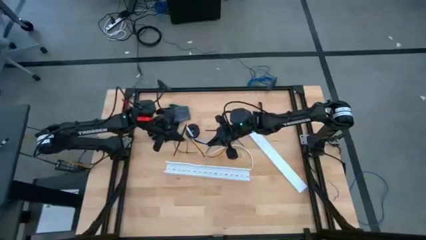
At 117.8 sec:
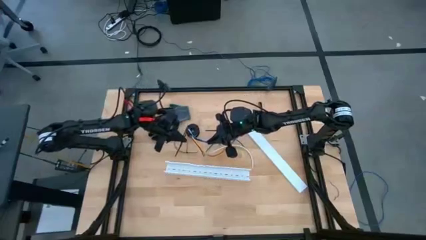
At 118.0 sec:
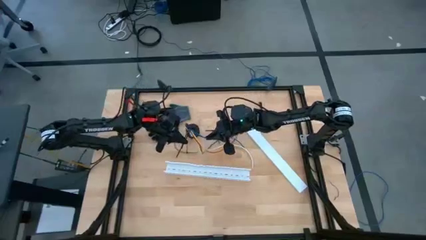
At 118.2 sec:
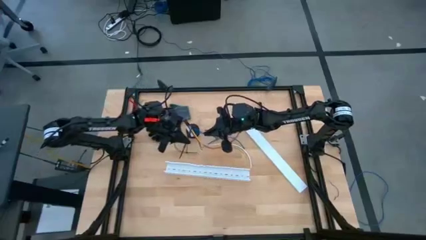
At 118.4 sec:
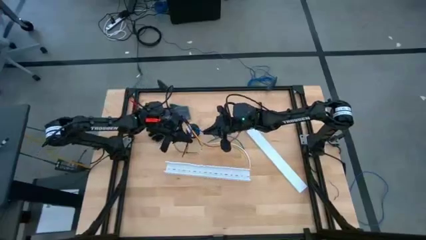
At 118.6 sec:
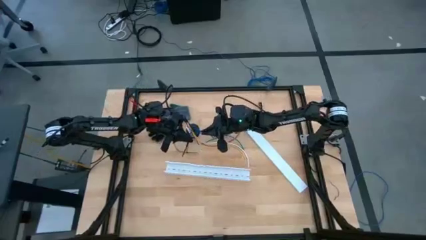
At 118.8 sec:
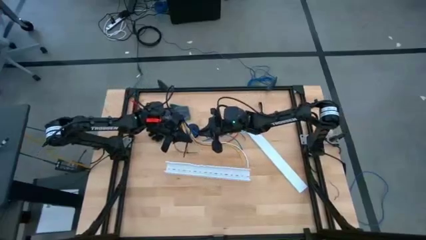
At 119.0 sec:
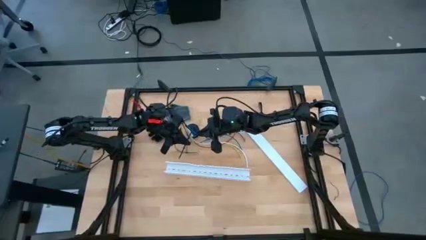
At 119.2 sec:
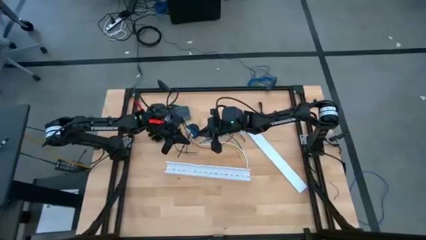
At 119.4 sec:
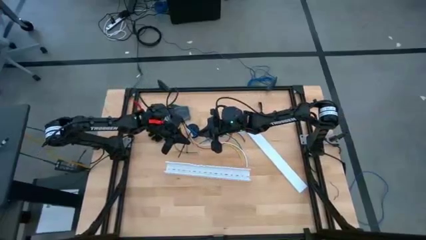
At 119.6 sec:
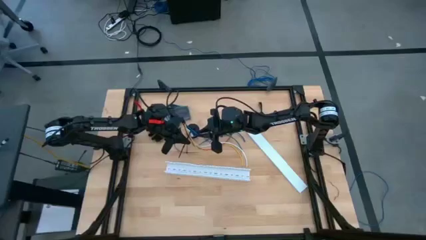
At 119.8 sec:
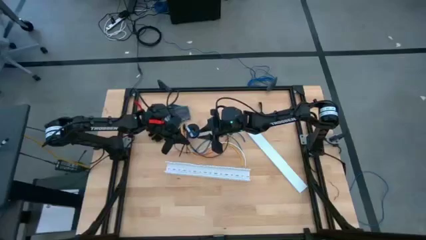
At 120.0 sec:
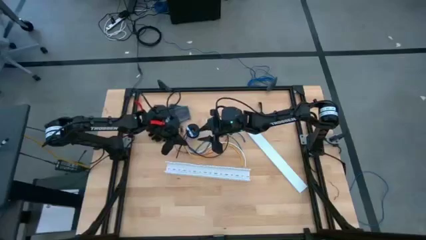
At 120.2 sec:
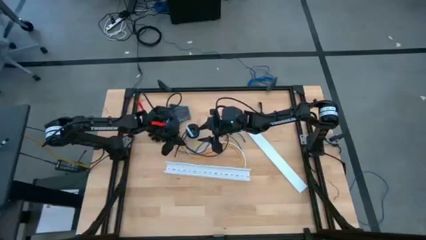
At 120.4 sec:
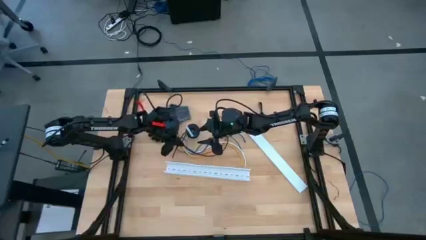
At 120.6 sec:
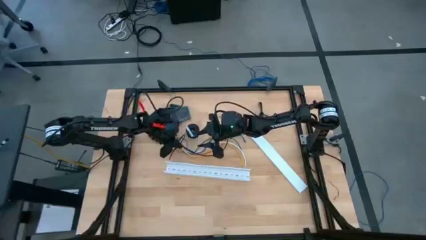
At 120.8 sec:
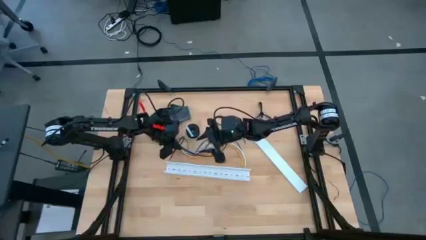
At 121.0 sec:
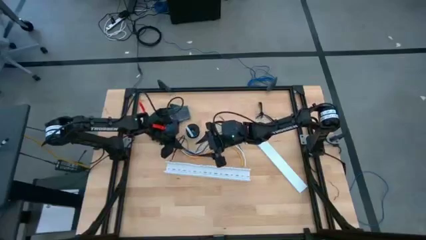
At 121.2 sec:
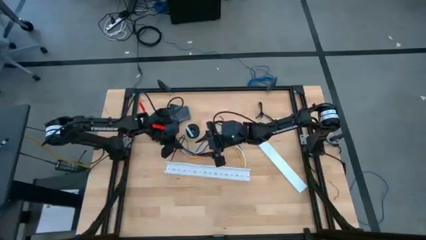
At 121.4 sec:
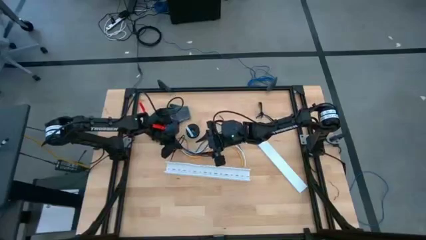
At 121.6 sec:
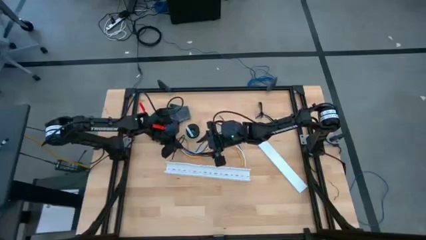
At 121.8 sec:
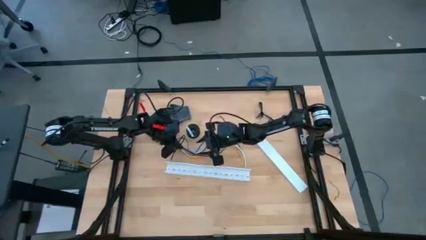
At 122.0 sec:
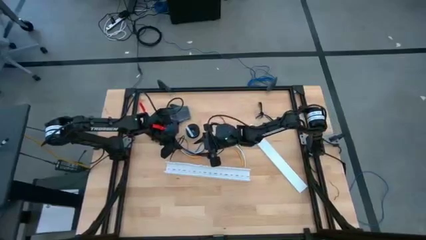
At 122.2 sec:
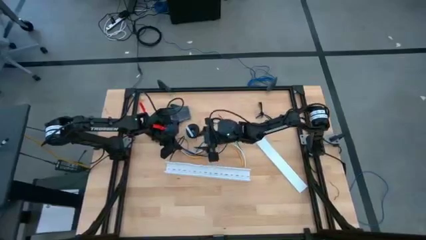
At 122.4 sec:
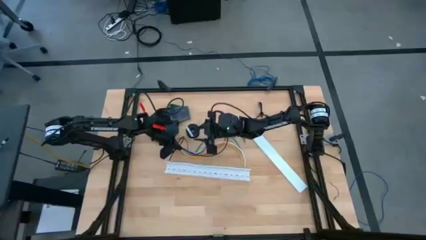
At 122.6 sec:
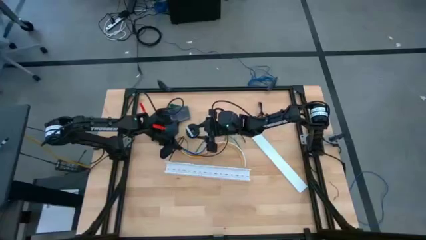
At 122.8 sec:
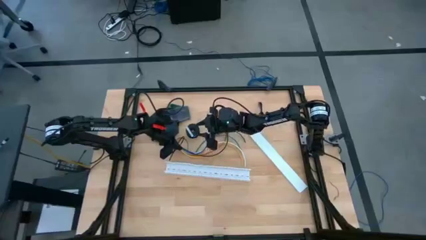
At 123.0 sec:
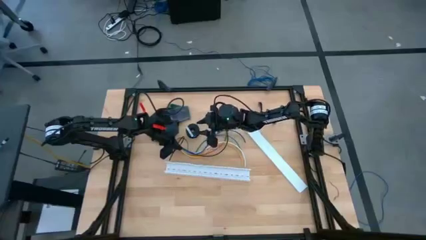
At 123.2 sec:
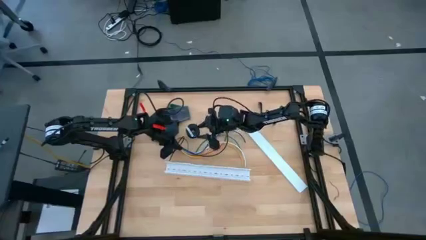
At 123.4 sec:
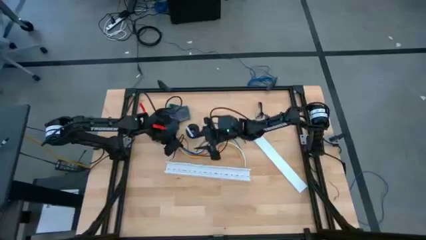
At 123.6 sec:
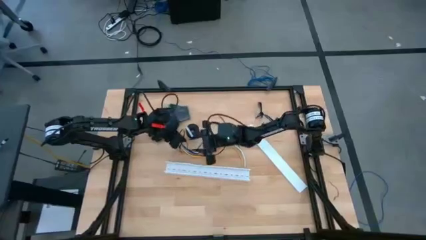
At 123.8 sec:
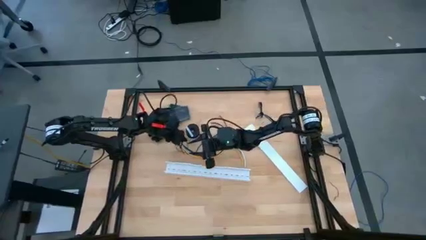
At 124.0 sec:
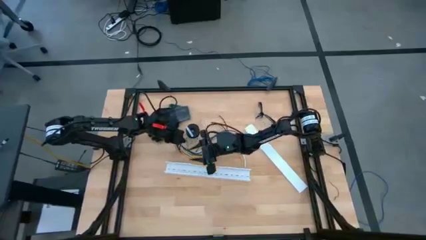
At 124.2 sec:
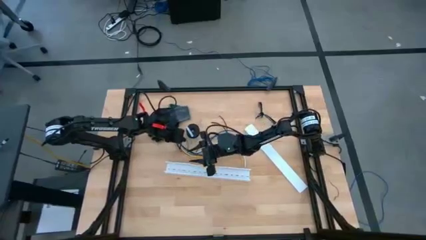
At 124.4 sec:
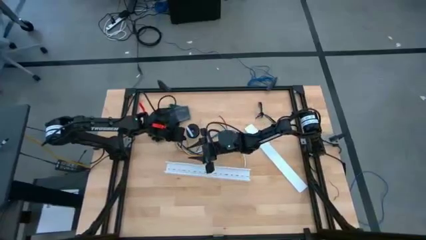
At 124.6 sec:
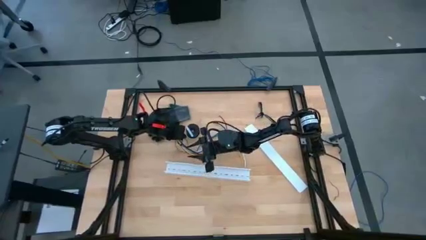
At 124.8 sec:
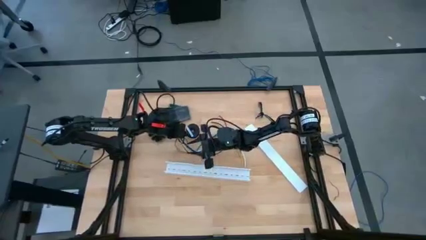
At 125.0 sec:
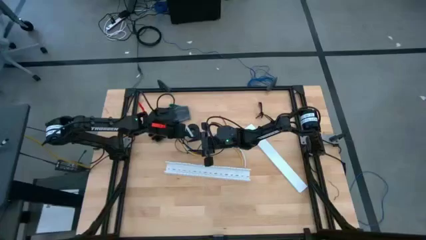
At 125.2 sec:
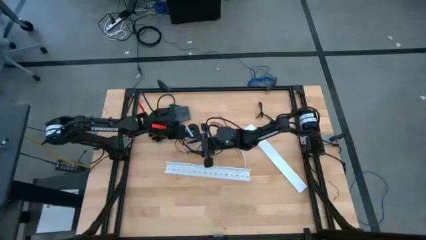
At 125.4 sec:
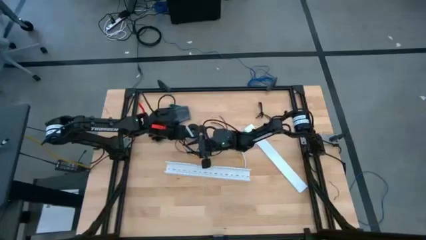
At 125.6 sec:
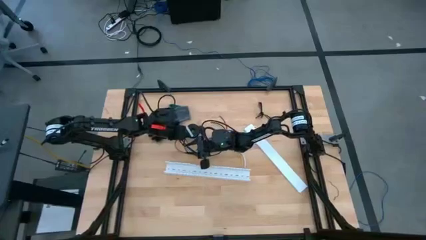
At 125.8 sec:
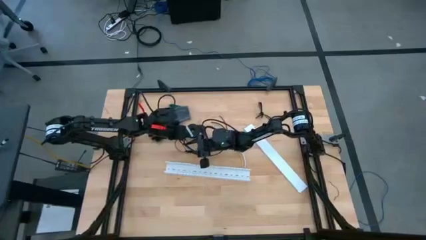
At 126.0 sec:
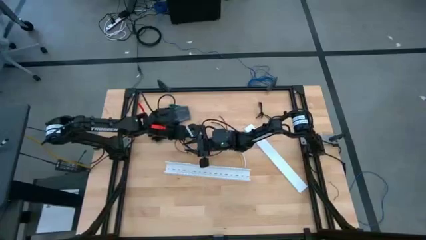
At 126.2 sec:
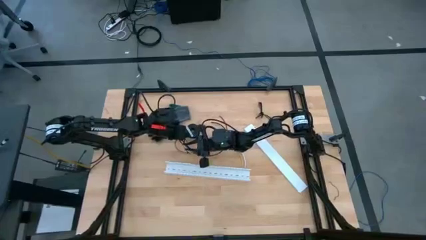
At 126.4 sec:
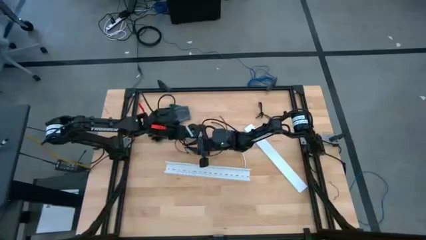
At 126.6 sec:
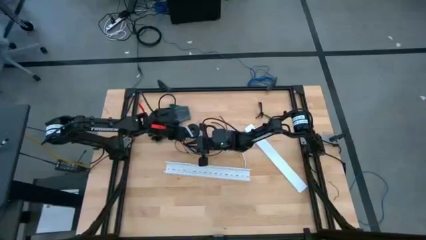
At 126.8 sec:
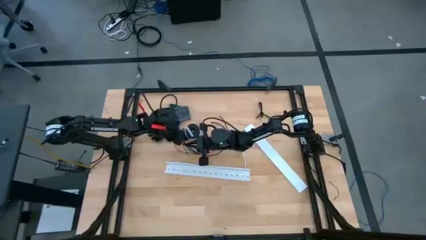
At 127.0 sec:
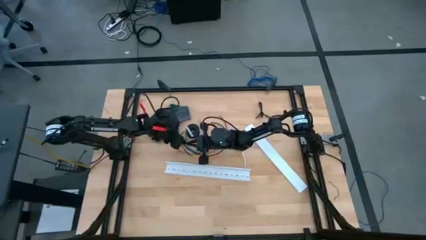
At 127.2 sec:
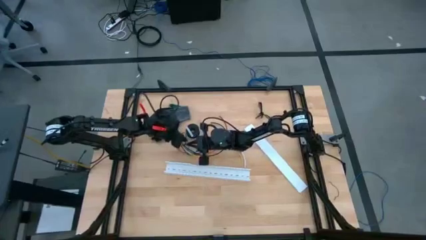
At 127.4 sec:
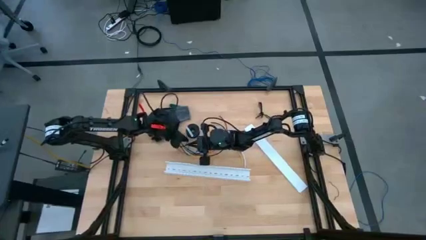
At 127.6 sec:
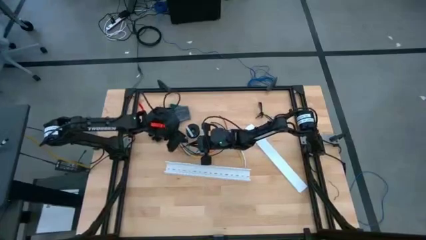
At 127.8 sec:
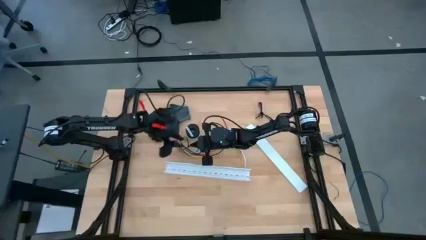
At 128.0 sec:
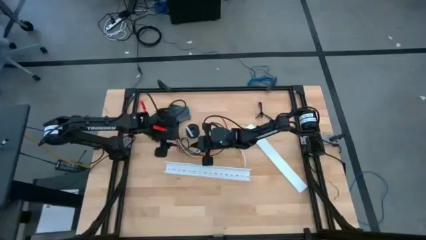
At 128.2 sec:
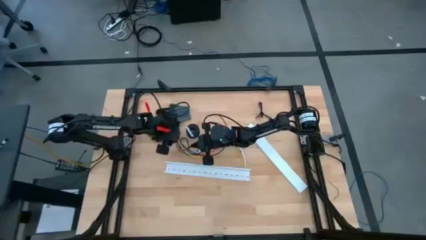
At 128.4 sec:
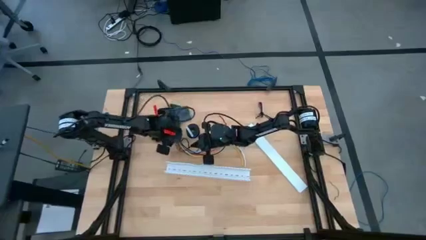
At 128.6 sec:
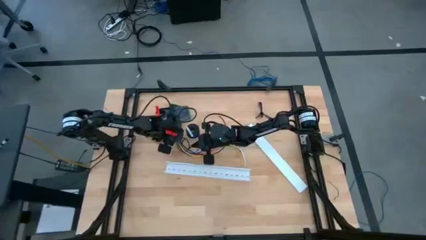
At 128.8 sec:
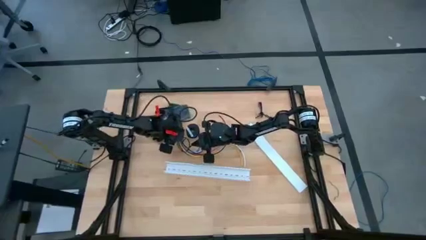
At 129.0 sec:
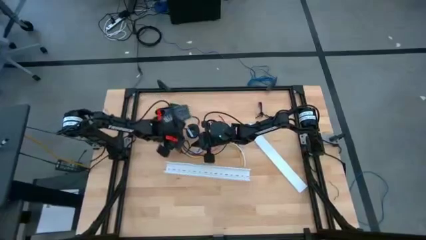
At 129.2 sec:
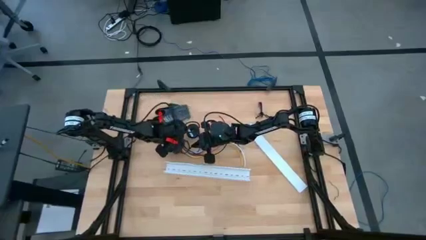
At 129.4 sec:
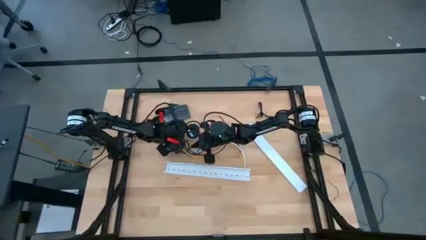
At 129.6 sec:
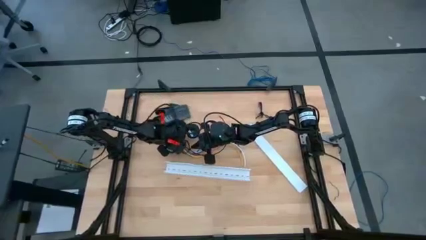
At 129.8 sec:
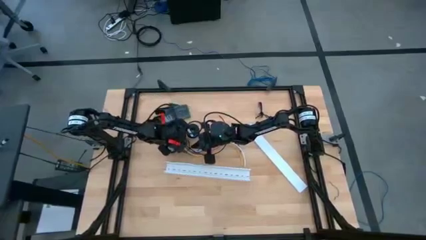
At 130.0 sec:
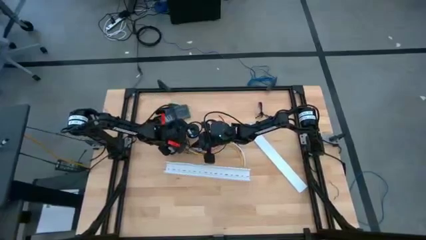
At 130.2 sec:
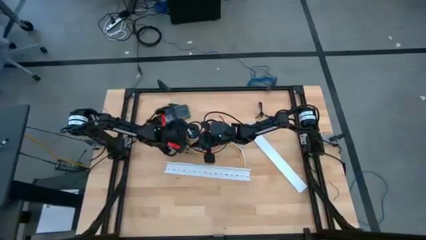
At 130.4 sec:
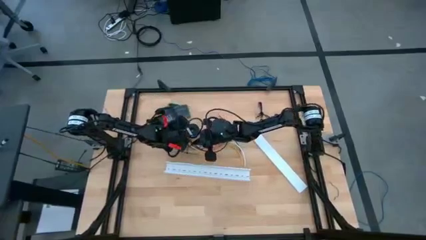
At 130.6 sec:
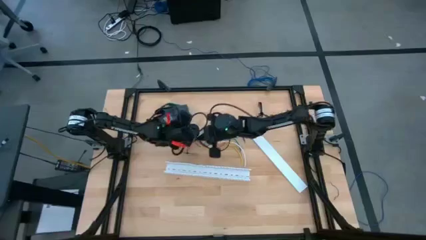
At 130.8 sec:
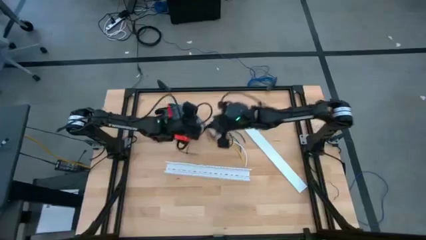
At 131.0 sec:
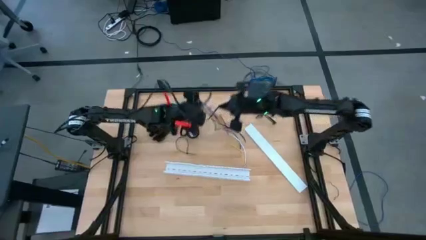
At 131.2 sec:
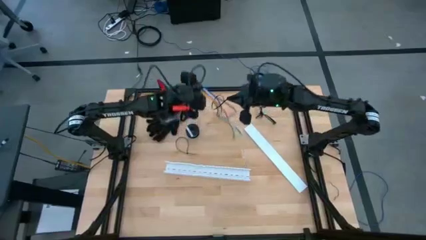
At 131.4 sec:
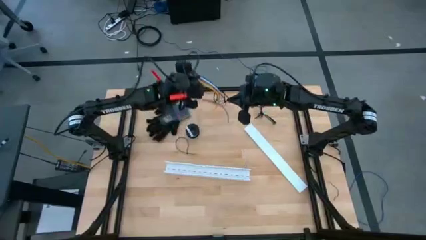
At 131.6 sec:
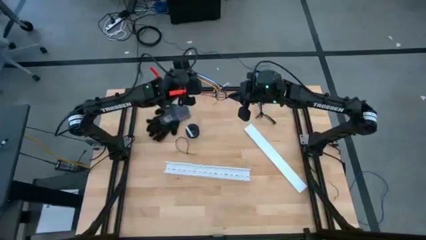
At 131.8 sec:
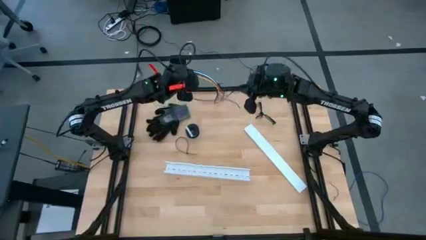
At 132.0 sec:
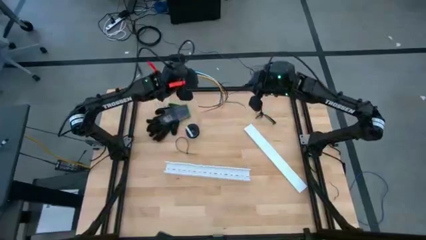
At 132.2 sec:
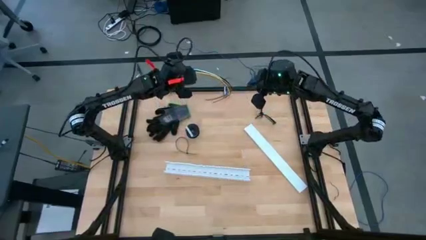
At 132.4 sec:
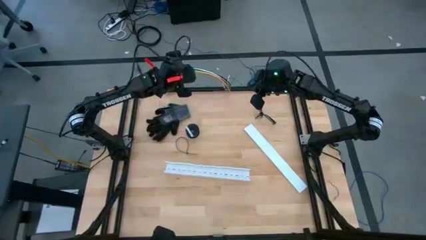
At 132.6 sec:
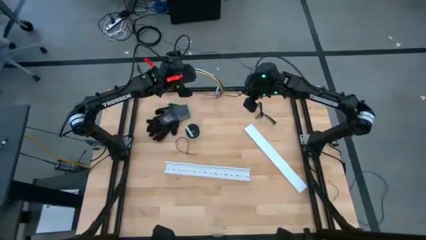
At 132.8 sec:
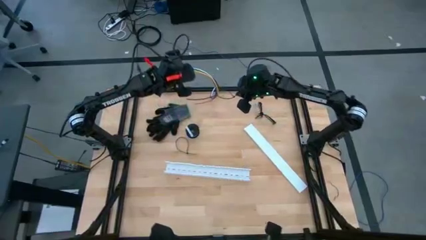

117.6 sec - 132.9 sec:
Task: Ziptie cables
Wrap the cable wires with the black zip tie
